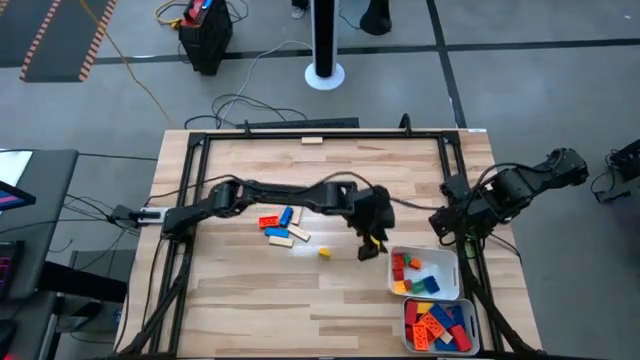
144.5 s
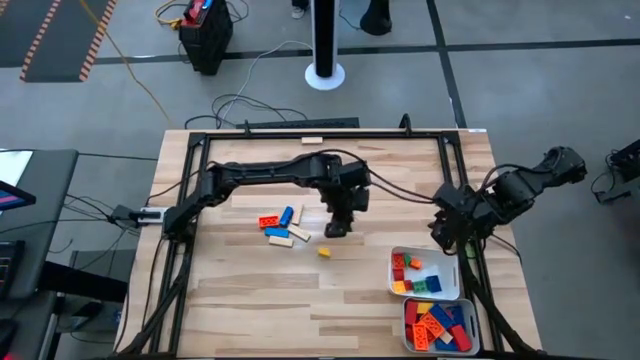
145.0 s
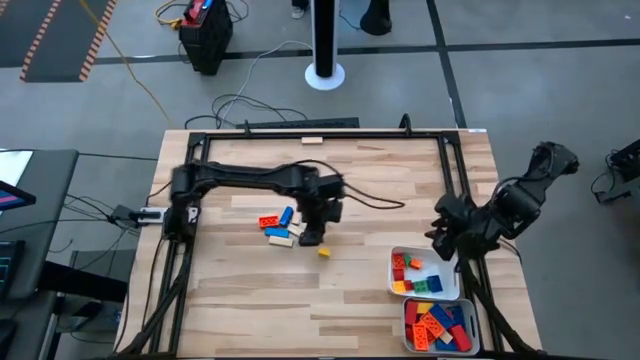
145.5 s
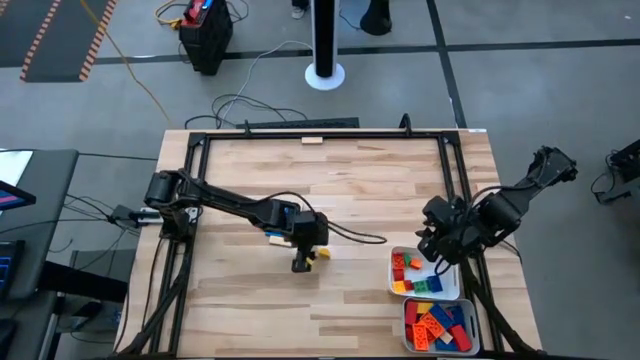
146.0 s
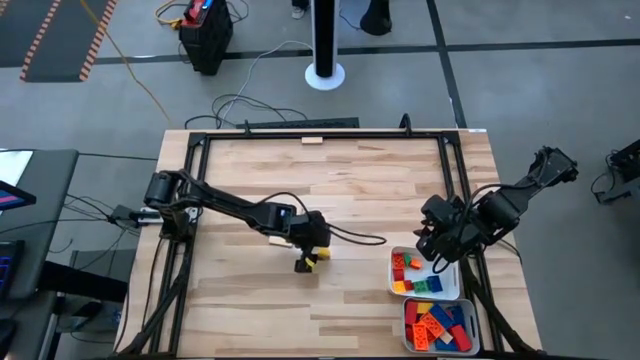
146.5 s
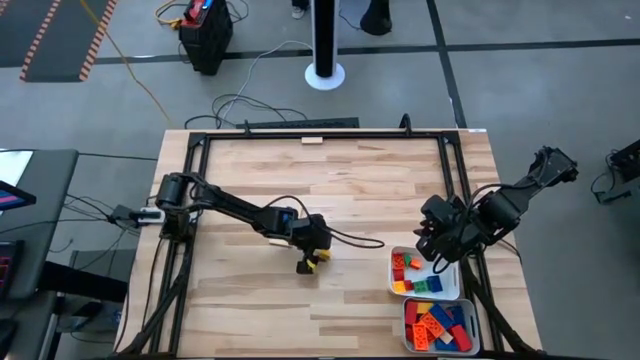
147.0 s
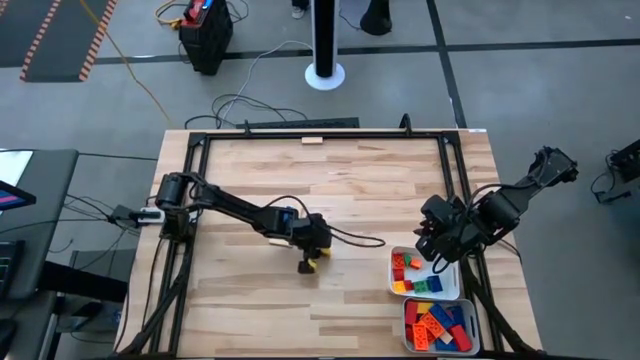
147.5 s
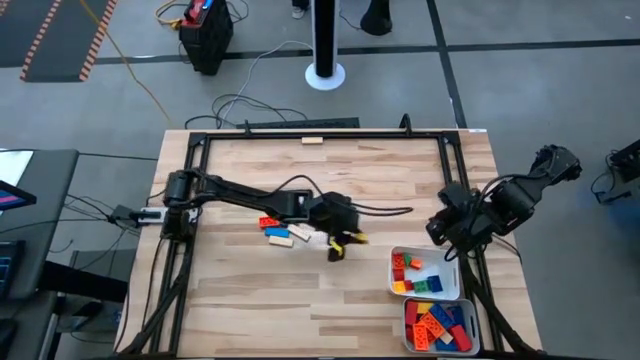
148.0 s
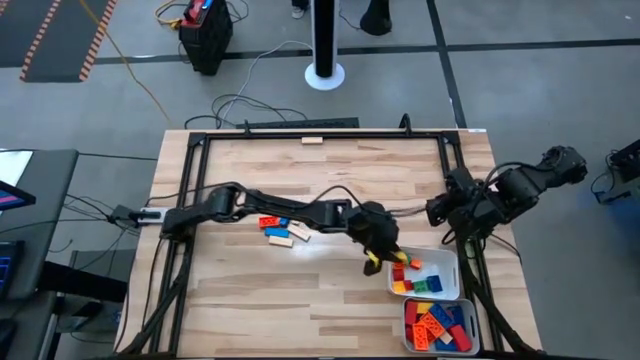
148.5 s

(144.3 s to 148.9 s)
Task: Sort blocks by size
Put the small yellow block into the white bin

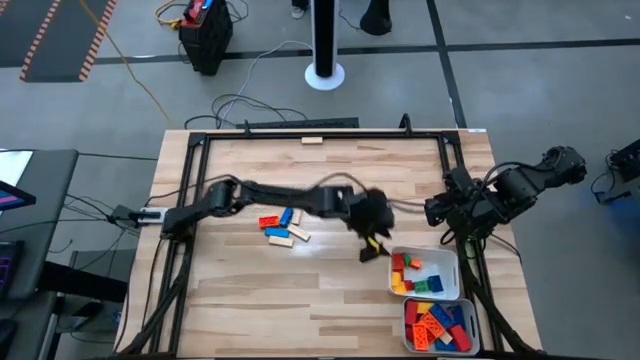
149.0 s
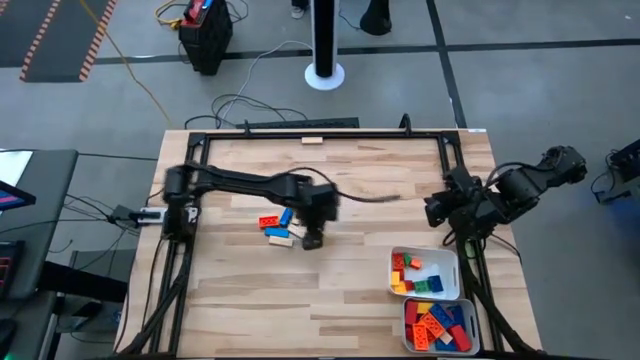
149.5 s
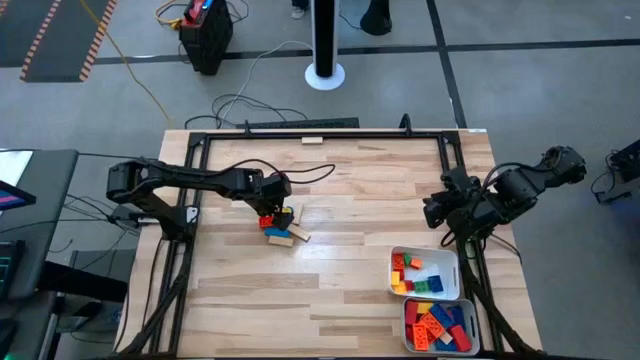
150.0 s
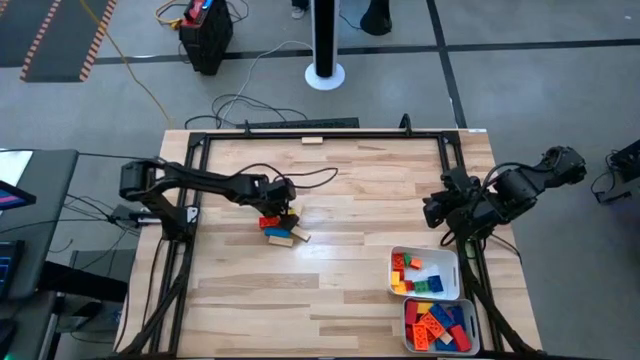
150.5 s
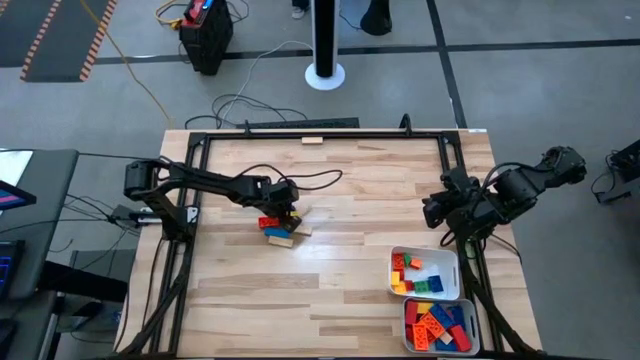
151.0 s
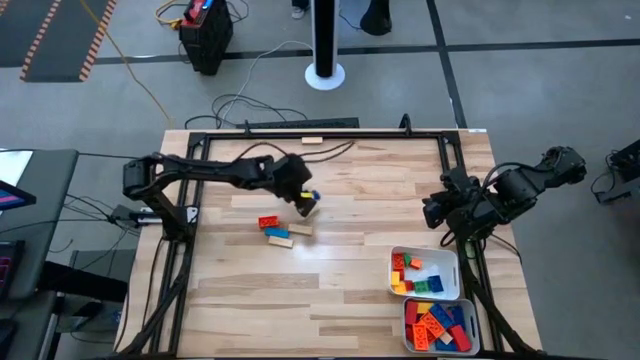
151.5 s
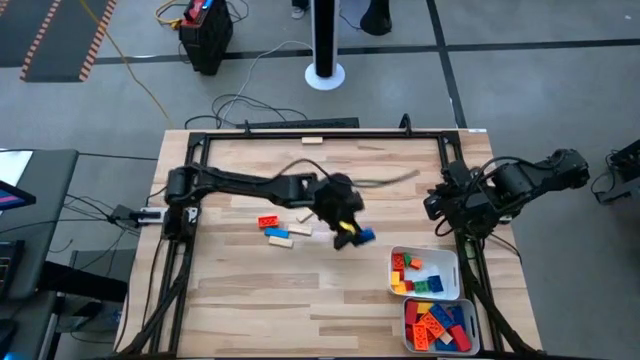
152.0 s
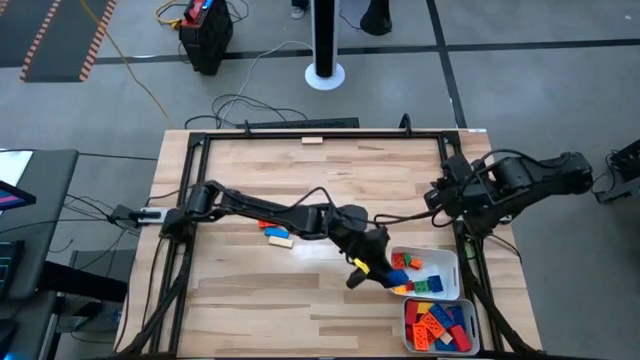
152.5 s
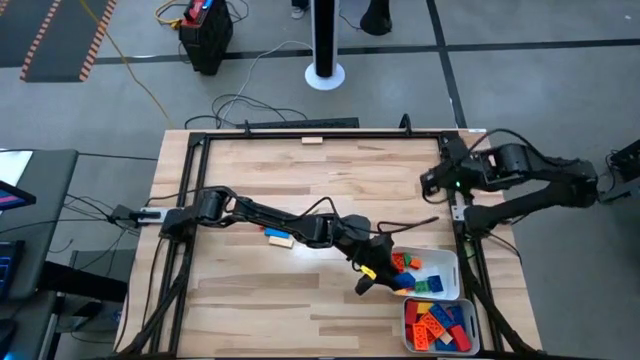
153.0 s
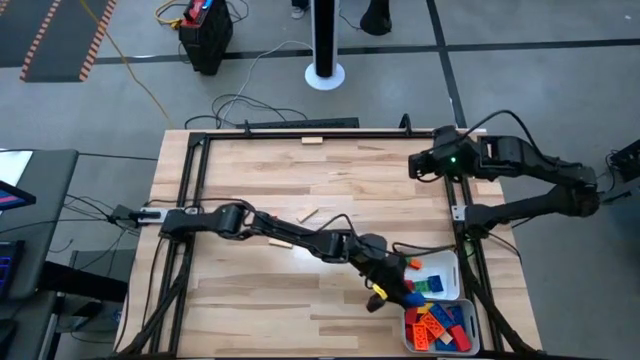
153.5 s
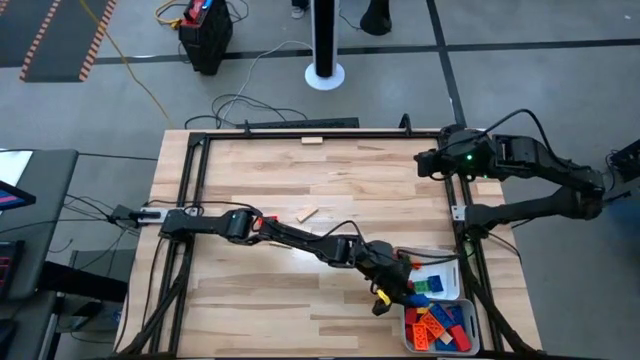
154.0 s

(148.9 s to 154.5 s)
Put the big blue game piece into the gray bin

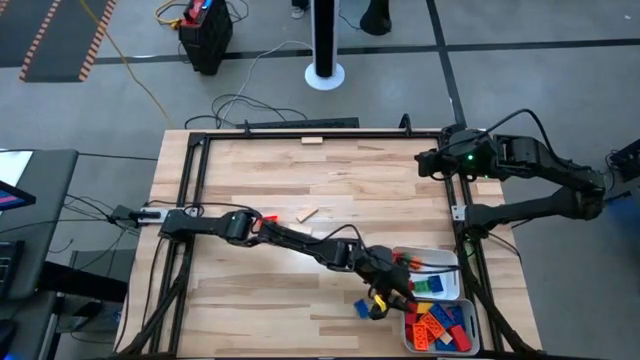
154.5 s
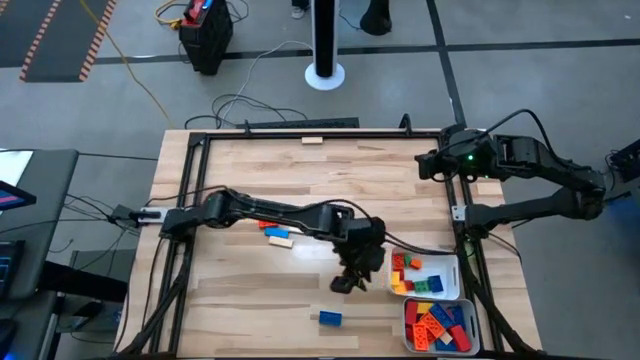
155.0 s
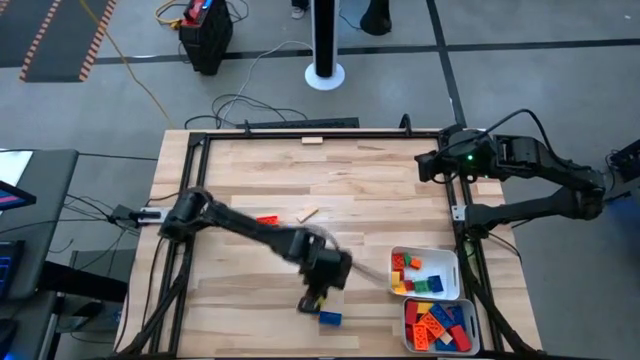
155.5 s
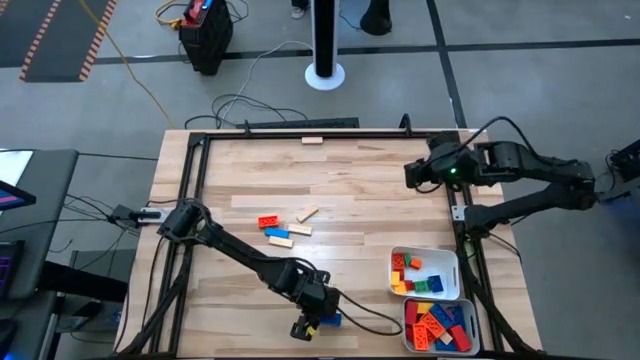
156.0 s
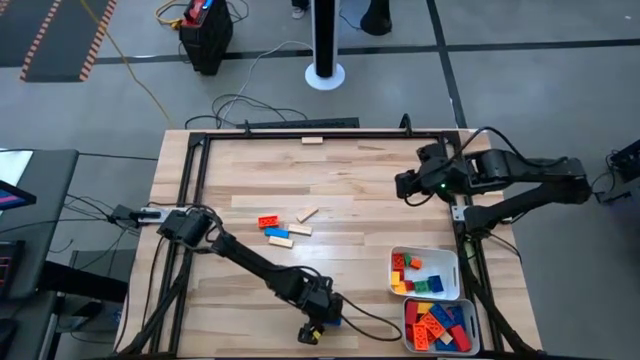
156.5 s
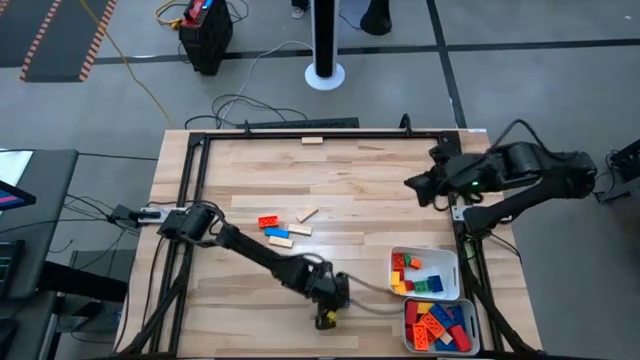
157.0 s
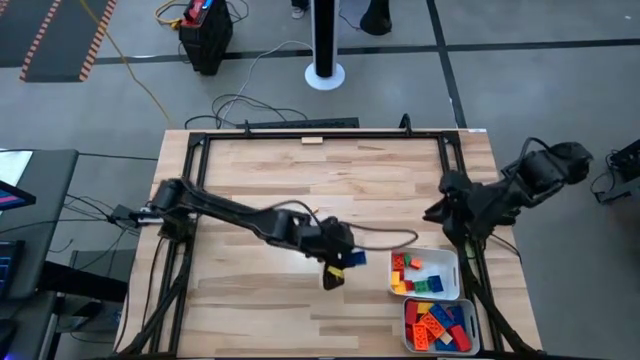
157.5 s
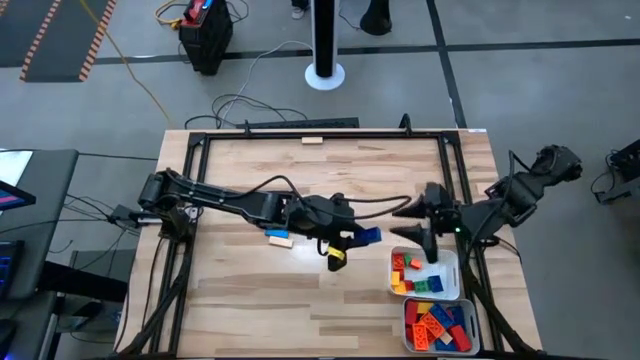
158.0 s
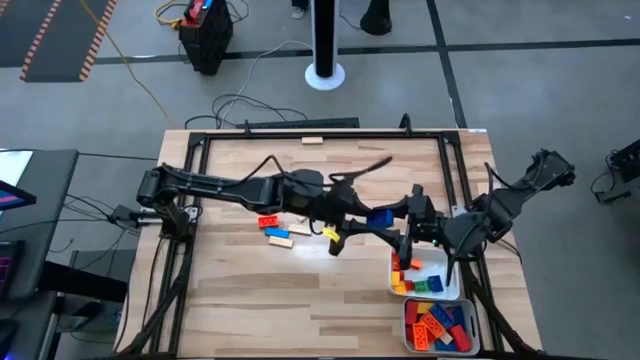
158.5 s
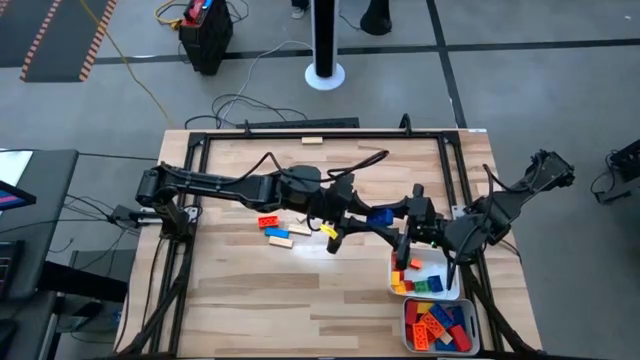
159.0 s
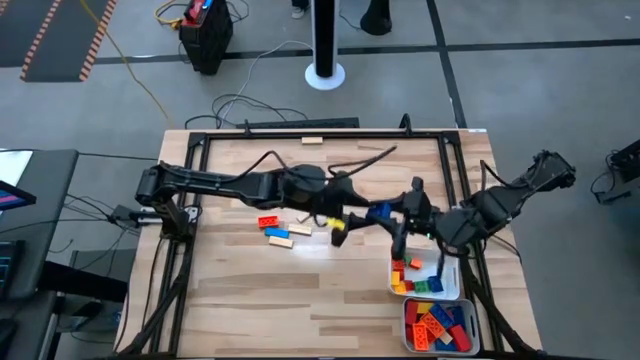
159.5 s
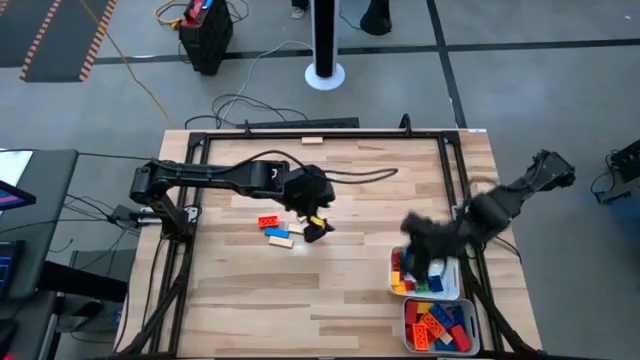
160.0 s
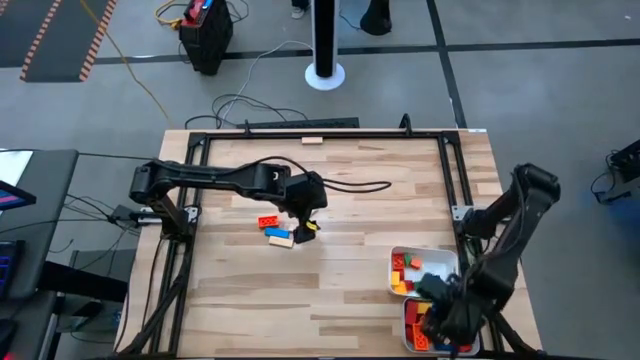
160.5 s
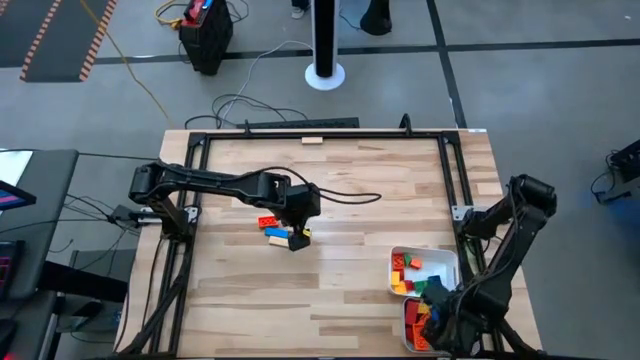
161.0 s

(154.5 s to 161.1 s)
Put the big blue game piece into the gray bin

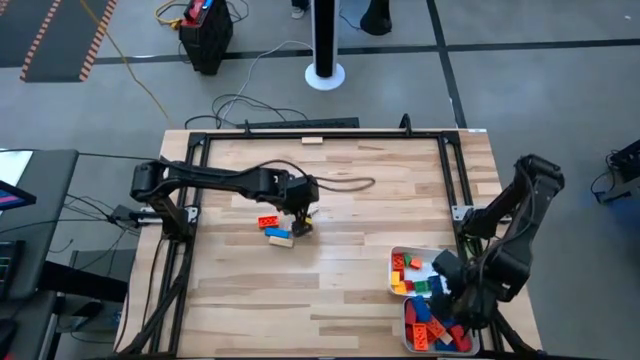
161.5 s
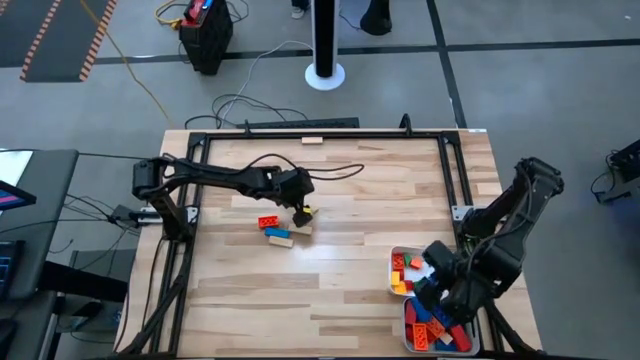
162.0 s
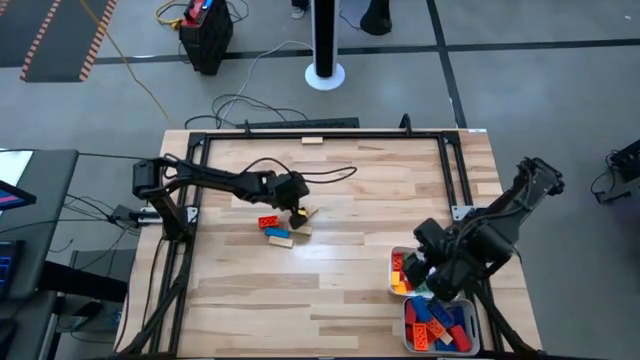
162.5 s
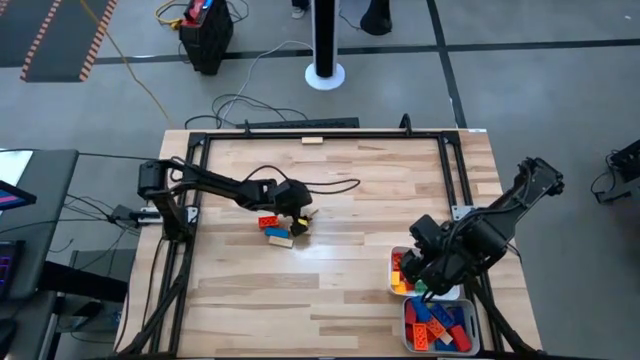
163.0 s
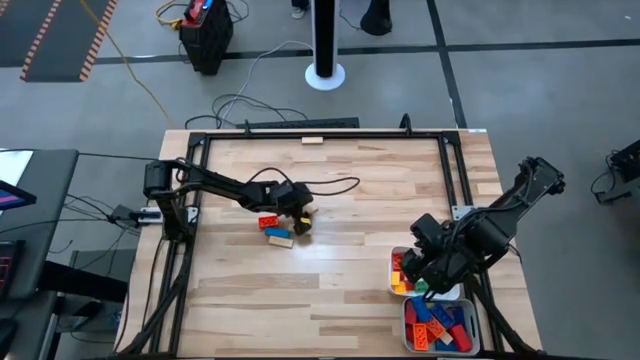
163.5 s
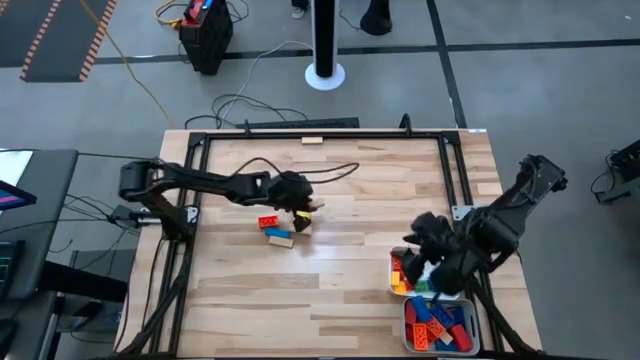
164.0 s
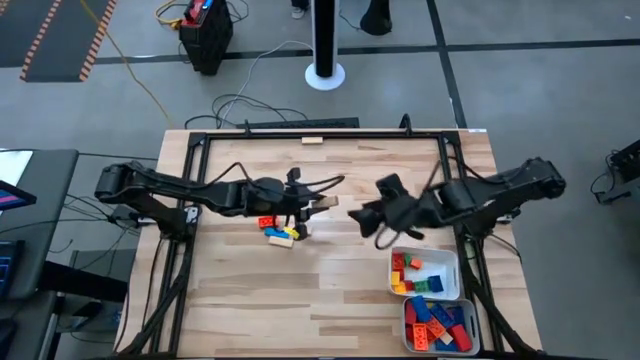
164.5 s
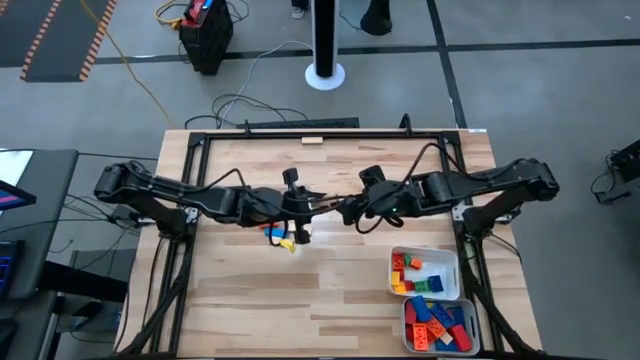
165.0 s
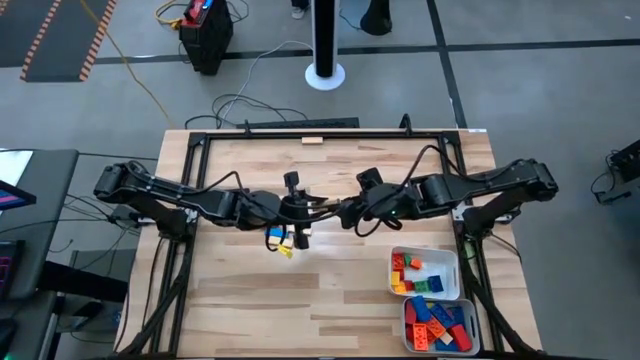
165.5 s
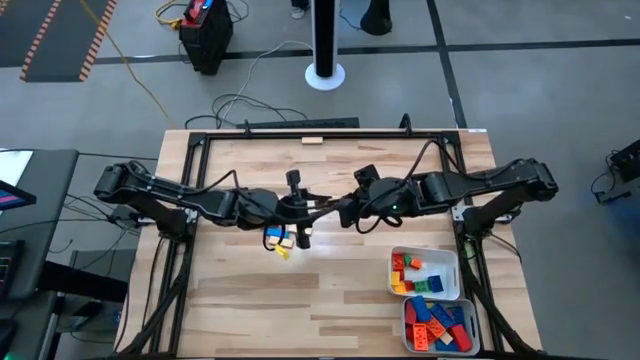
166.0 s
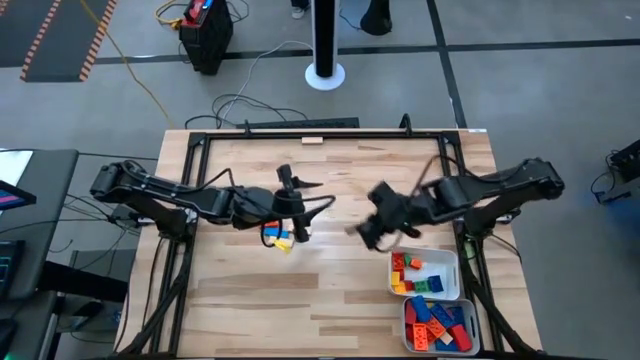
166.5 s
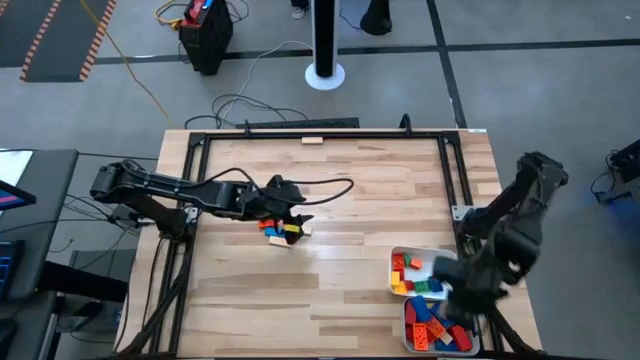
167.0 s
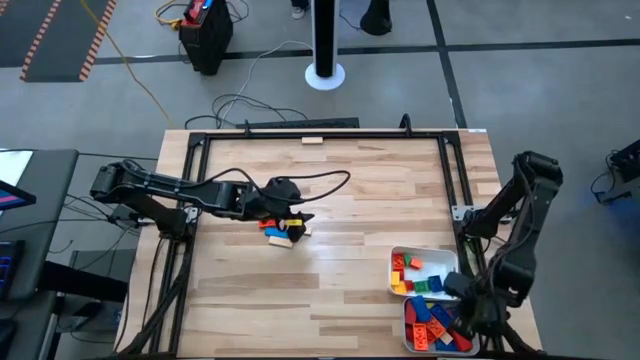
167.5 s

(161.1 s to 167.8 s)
Put the big brown block into the gray bin
